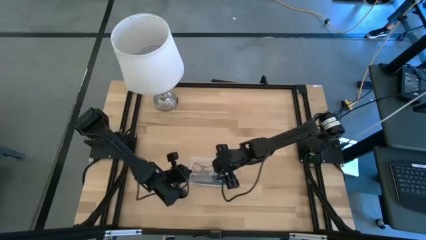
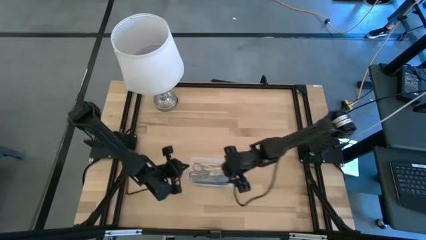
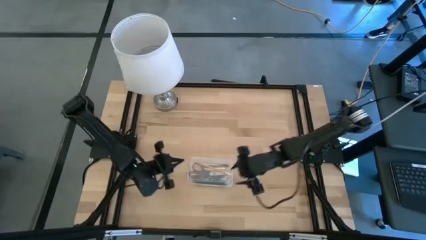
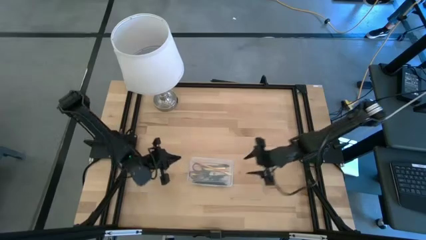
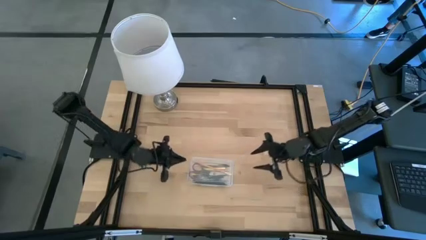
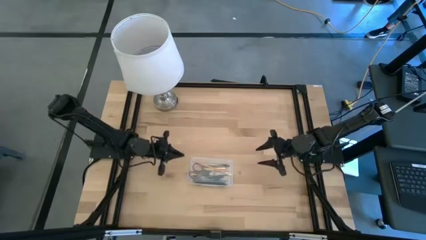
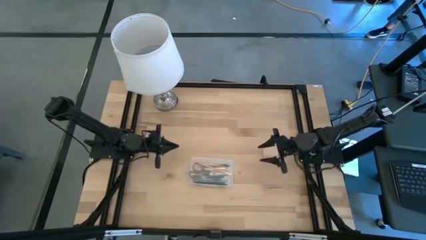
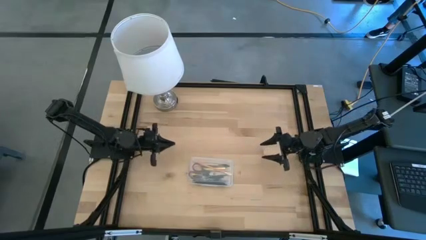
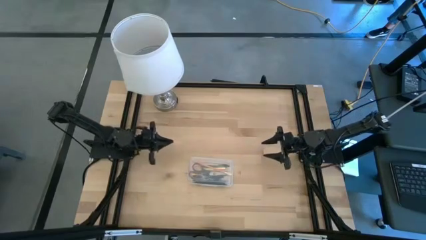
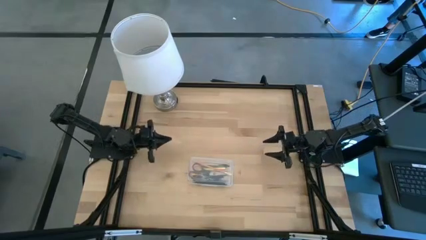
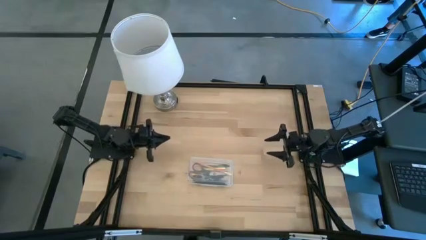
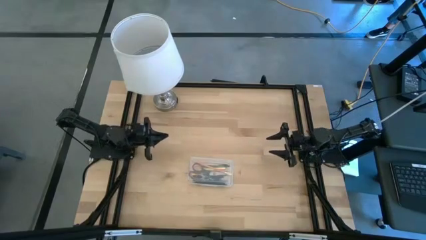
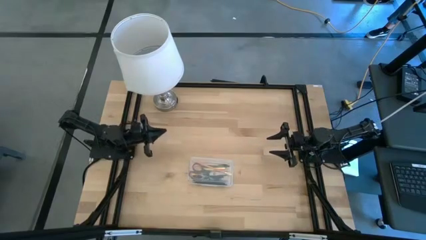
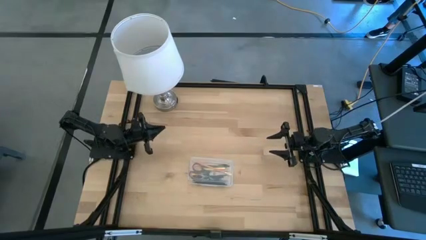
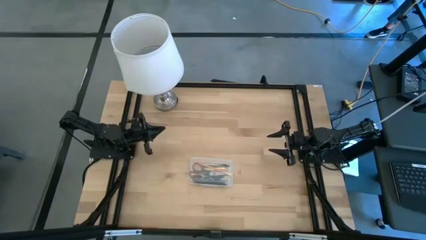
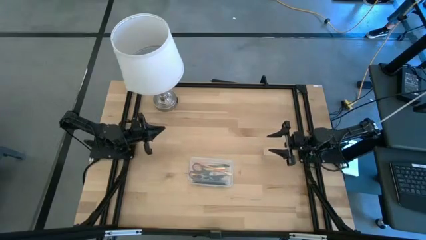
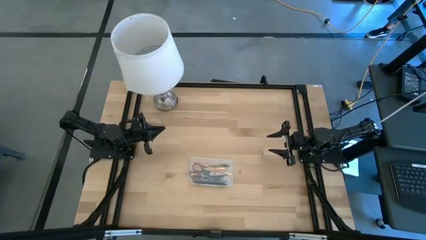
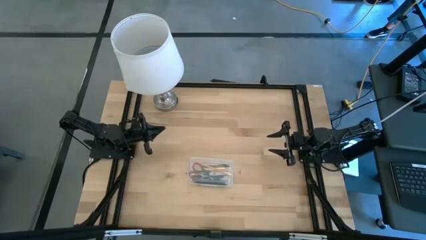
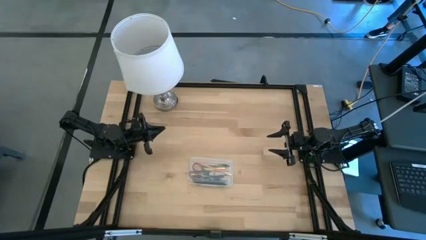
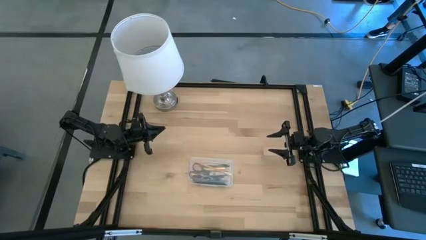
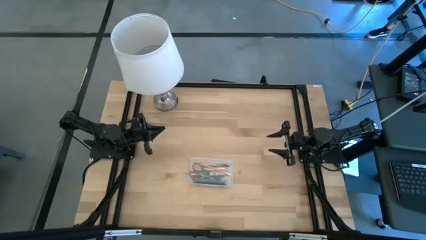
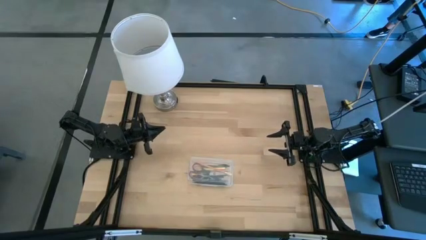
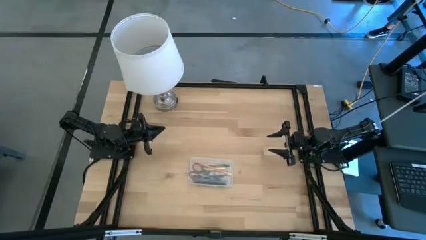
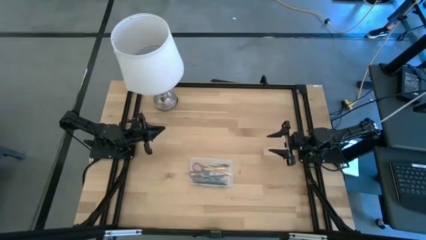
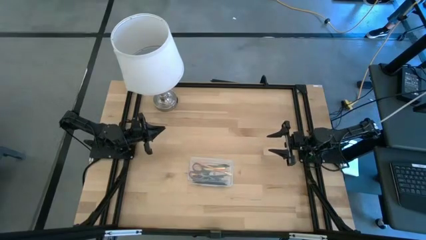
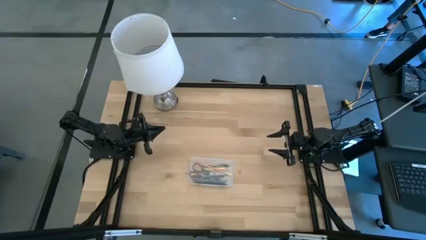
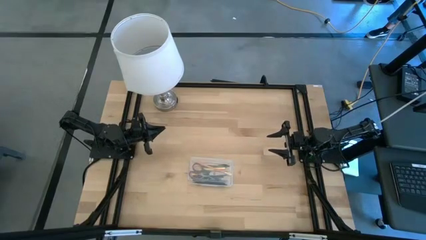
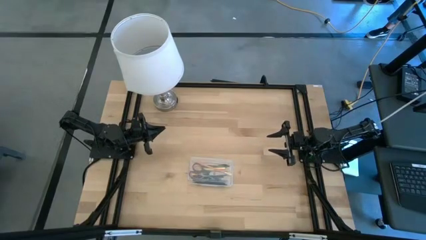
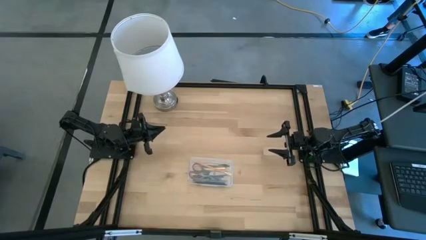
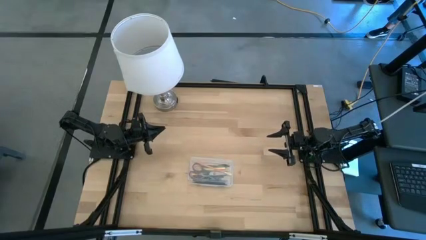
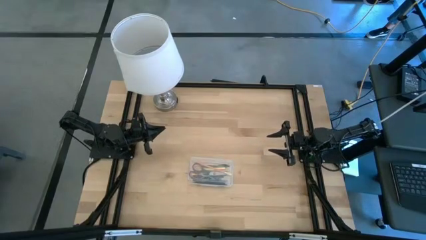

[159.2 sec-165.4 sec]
Task: Pick & place school supplies into a supply box
Return to Home Position

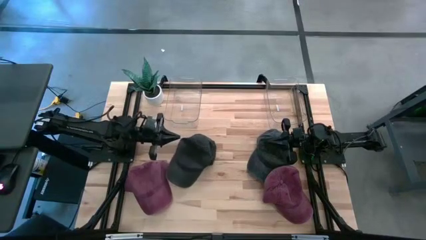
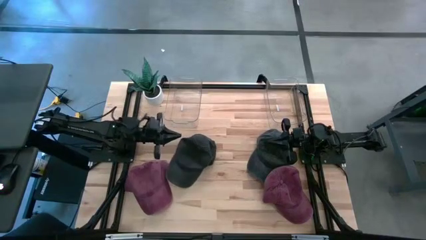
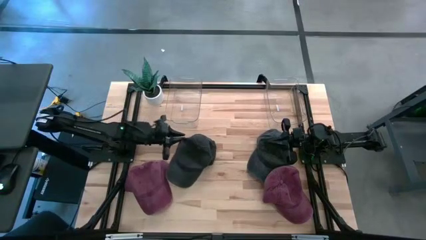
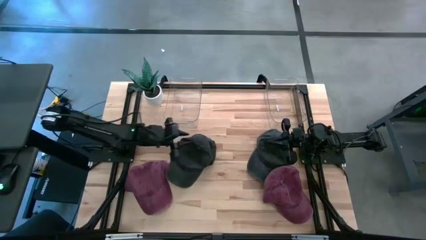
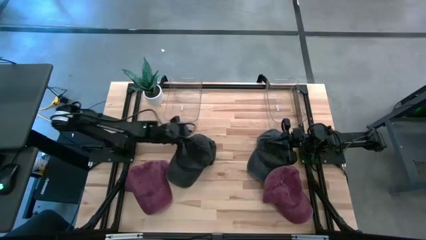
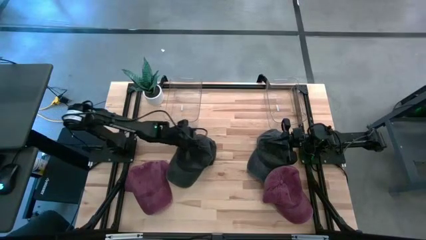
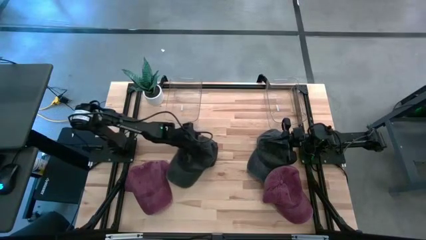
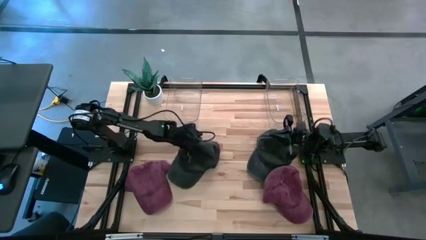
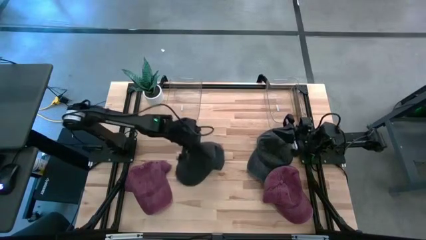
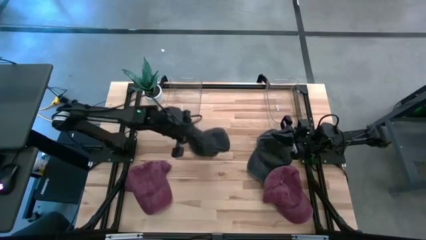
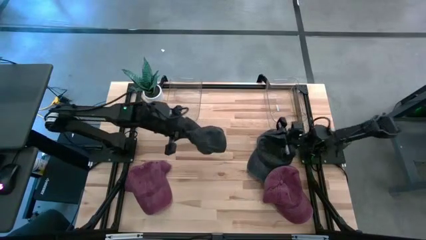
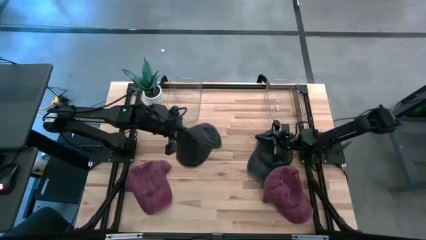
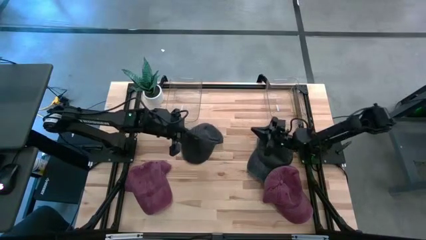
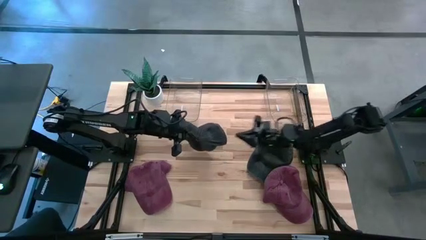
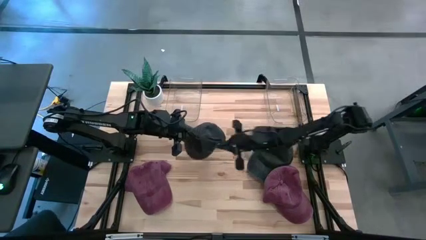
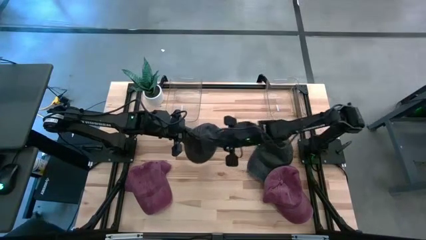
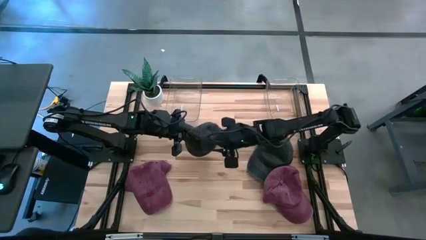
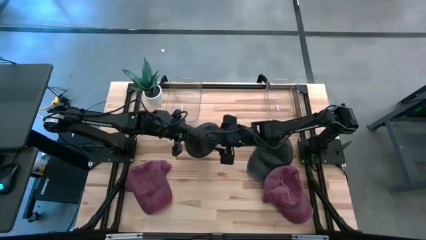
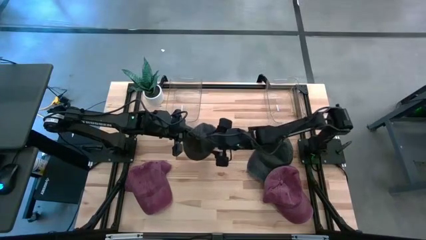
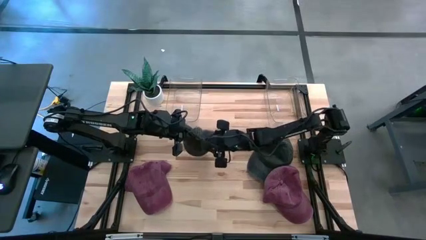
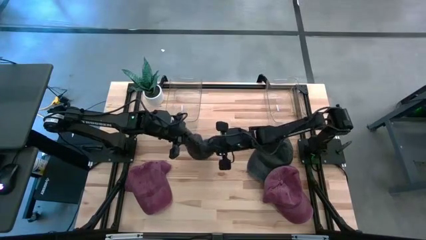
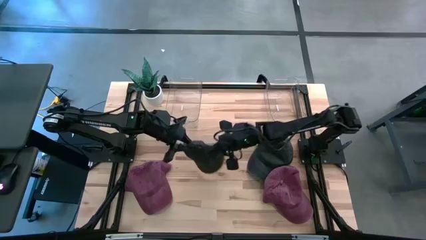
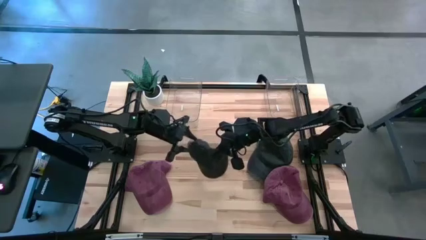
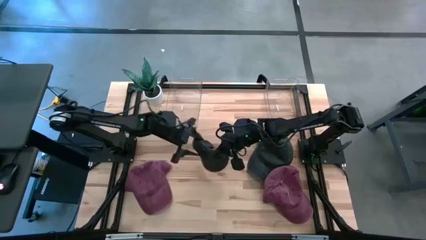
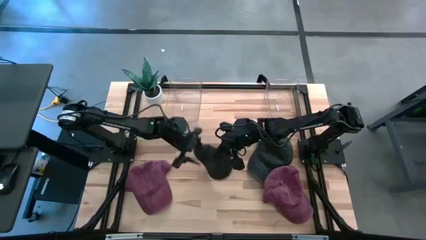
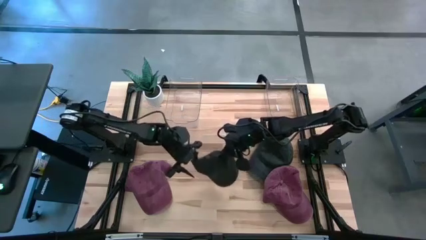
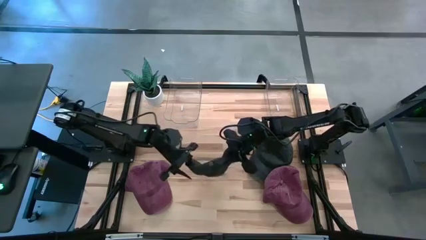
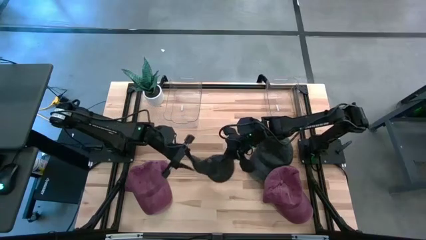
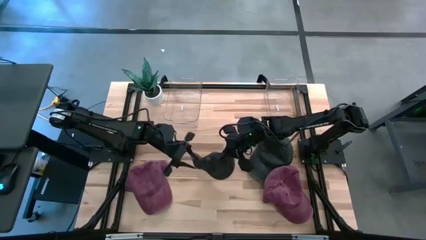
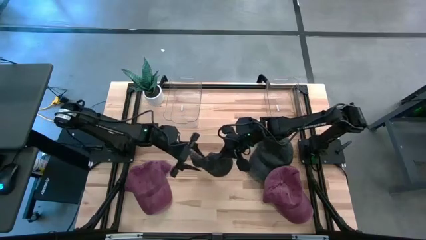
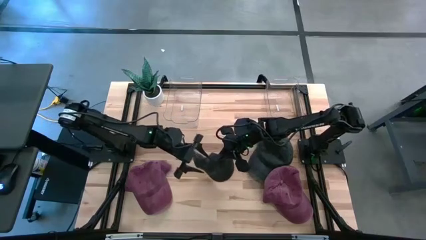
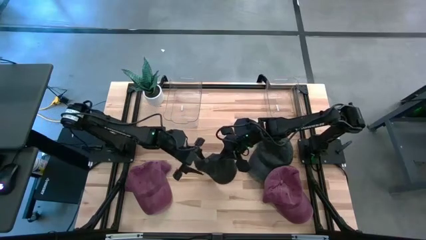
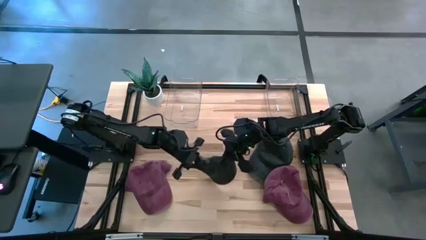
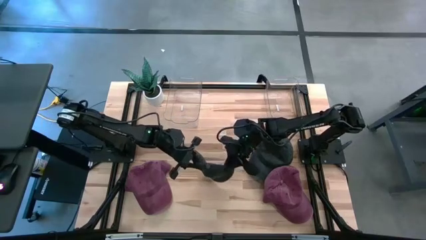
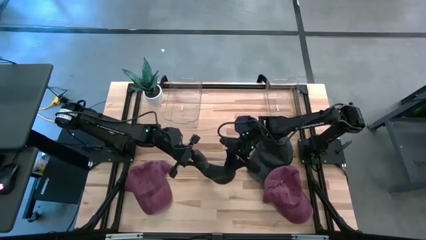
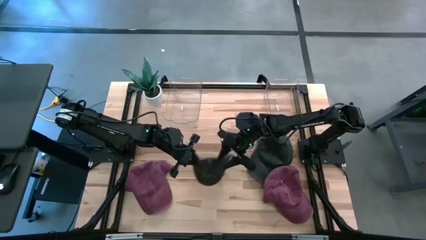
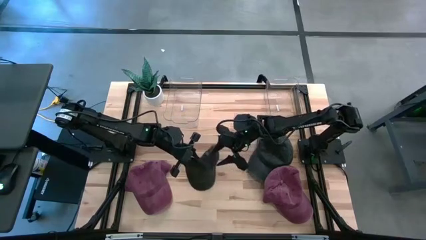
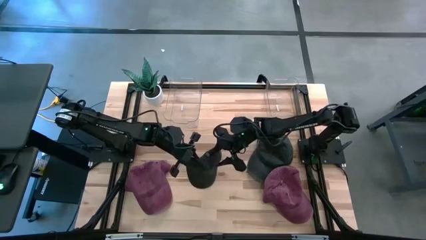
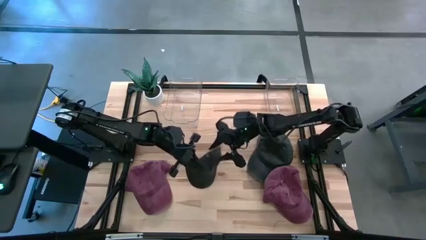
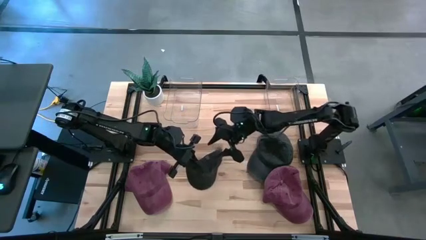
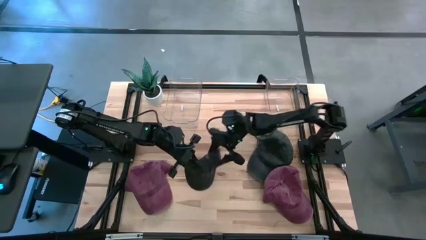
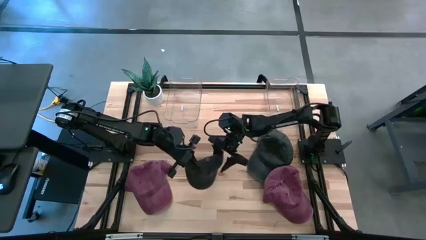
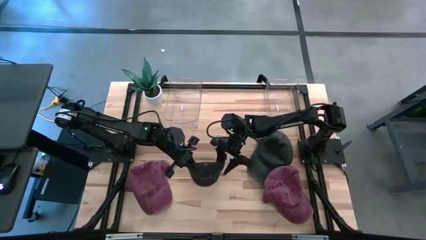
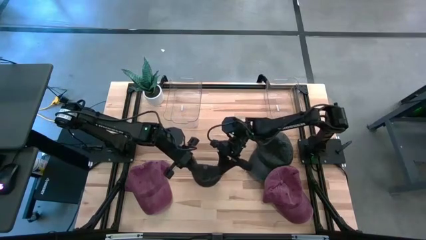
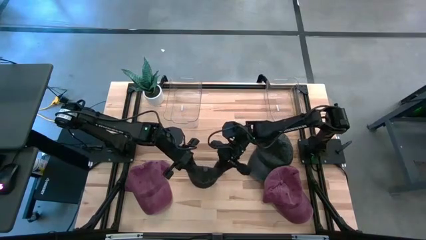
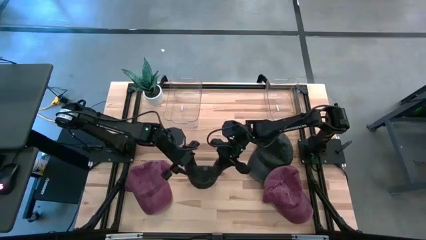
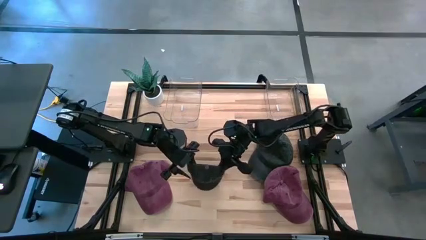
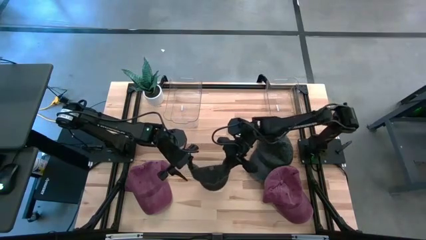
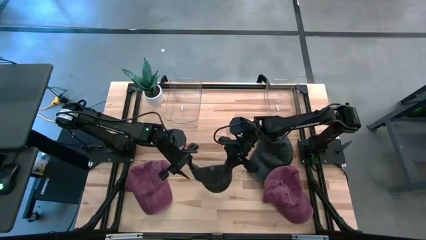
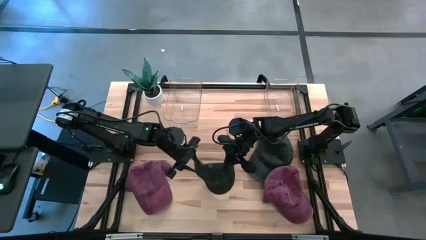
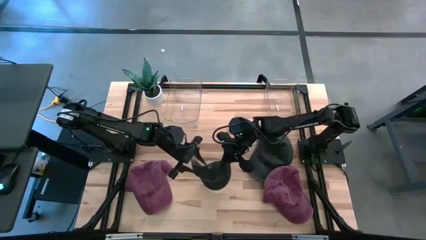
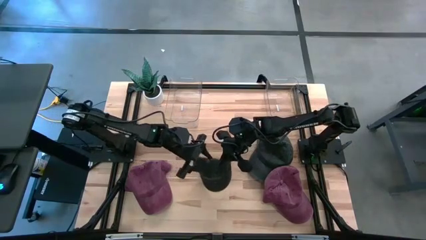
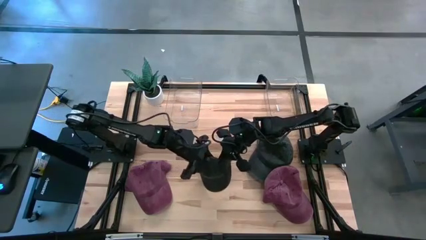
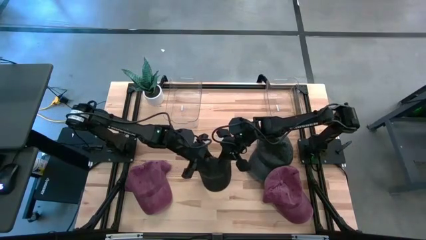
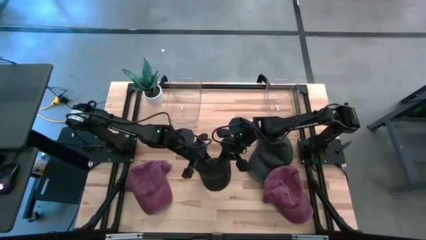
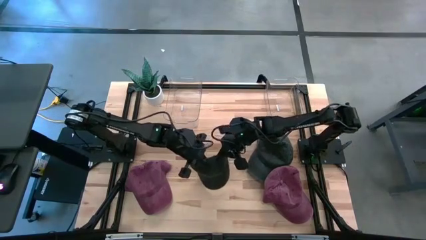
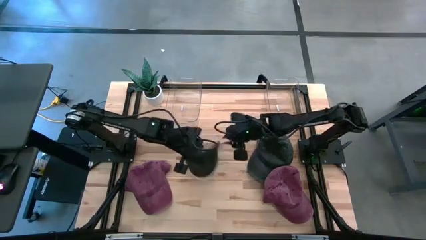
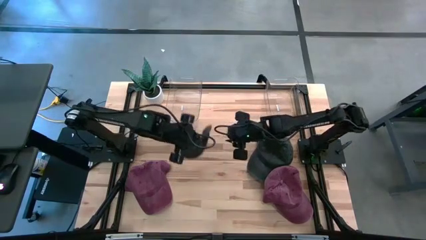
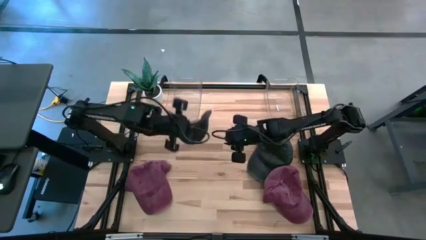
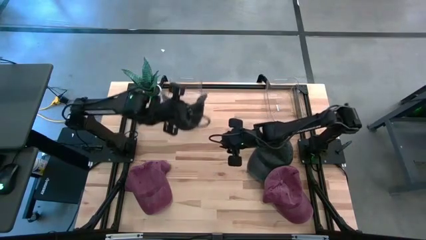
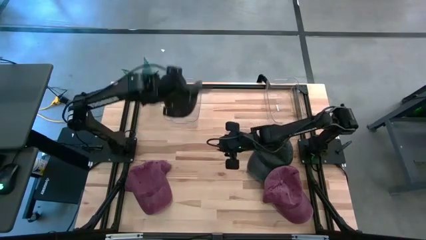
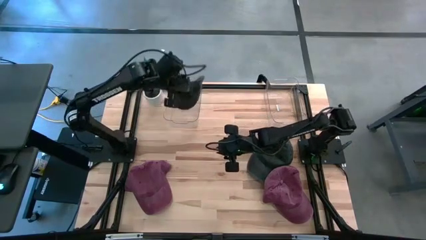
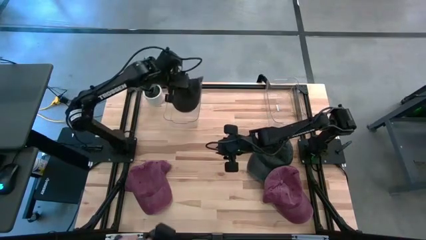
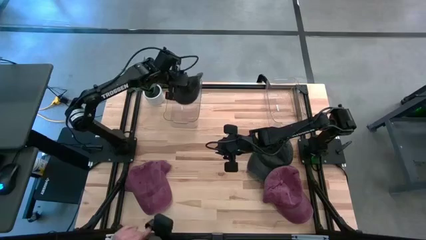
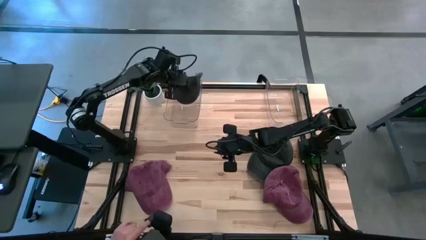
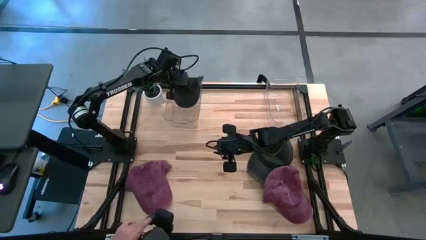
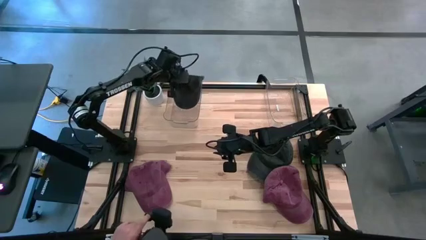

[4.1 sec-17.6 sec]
Task: Pick & Place hat
Put the left black cap into the left transparent bin
